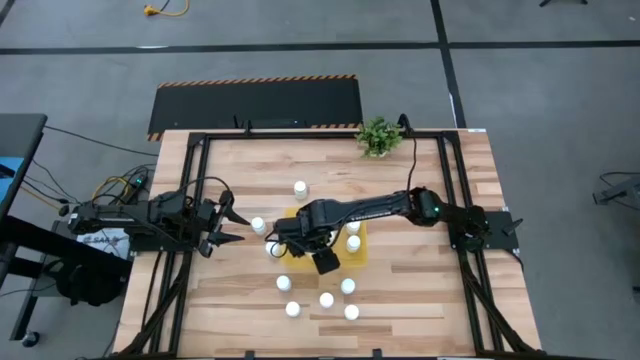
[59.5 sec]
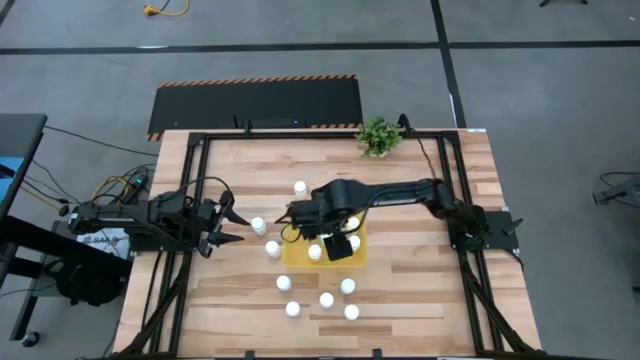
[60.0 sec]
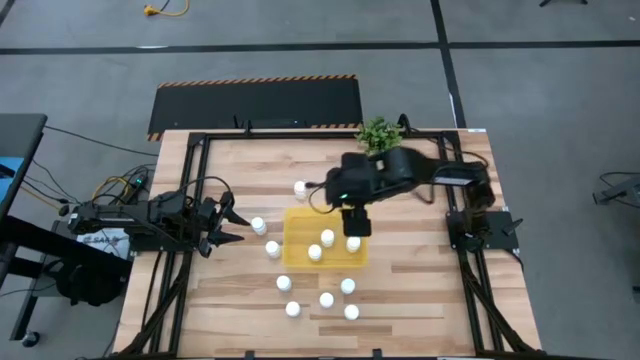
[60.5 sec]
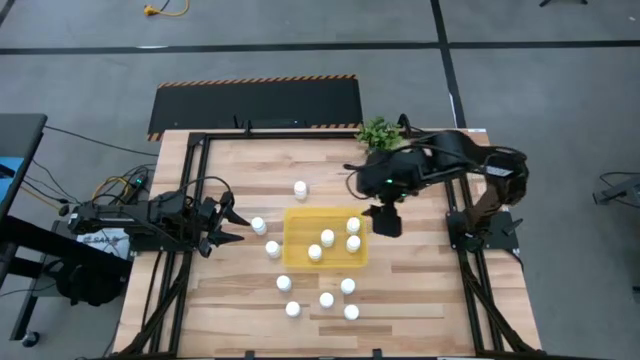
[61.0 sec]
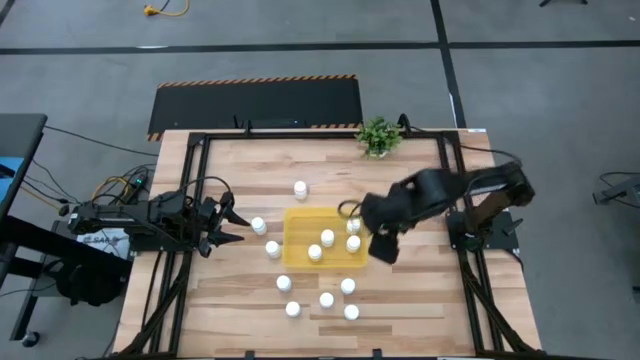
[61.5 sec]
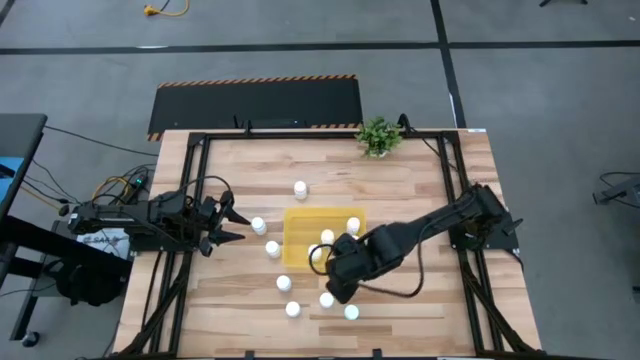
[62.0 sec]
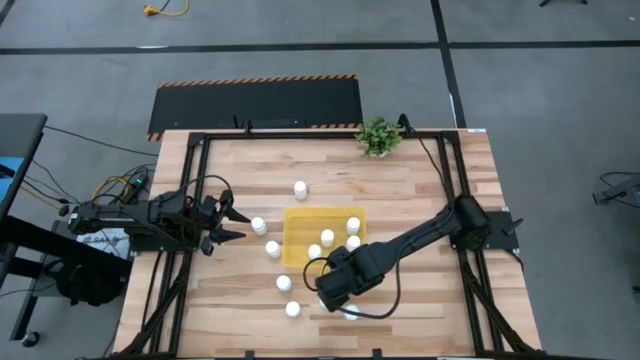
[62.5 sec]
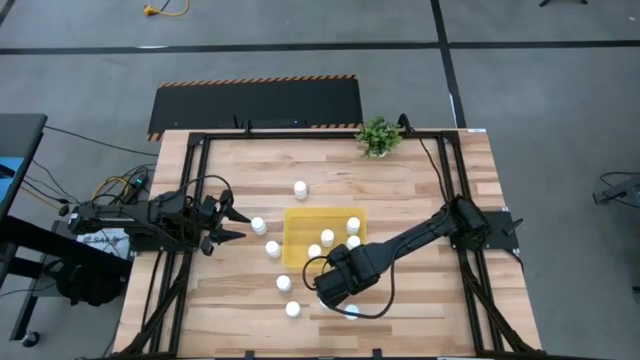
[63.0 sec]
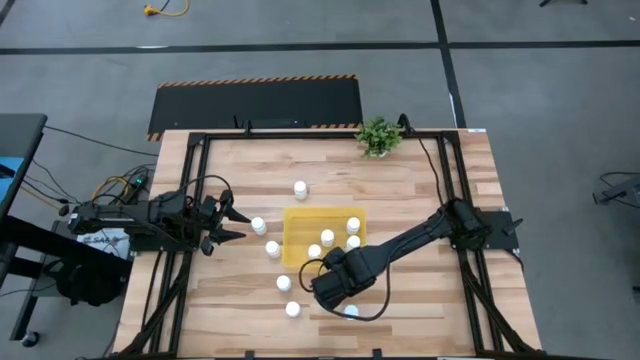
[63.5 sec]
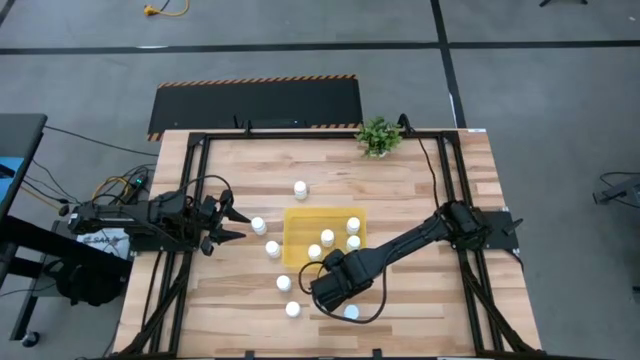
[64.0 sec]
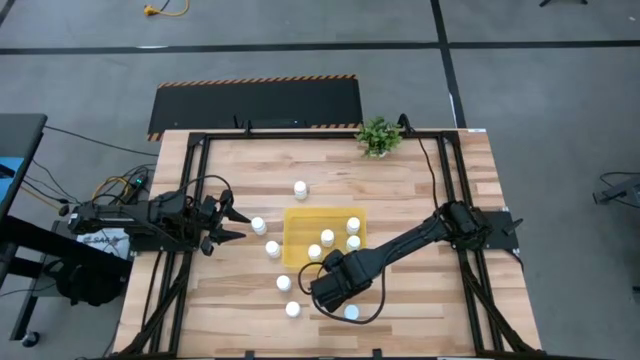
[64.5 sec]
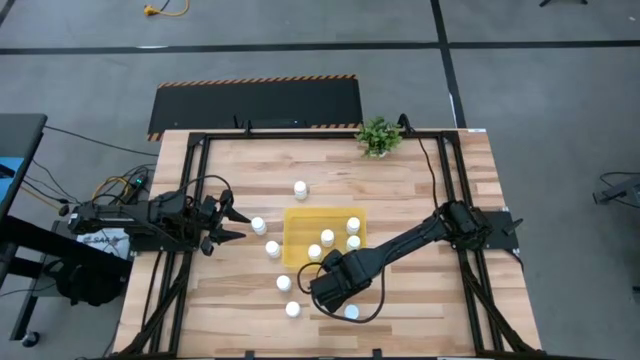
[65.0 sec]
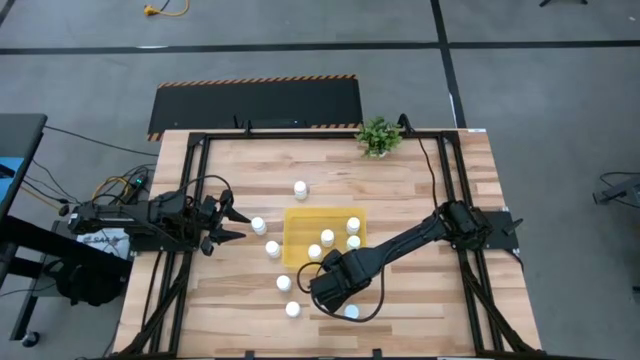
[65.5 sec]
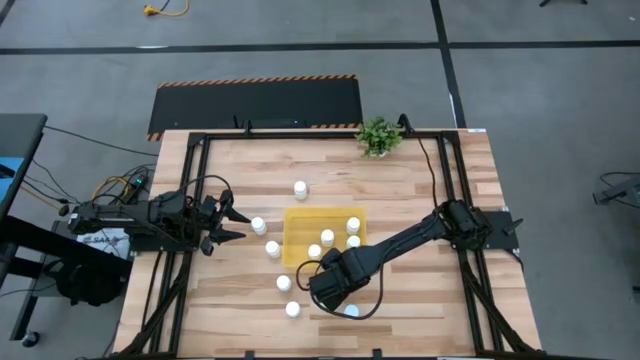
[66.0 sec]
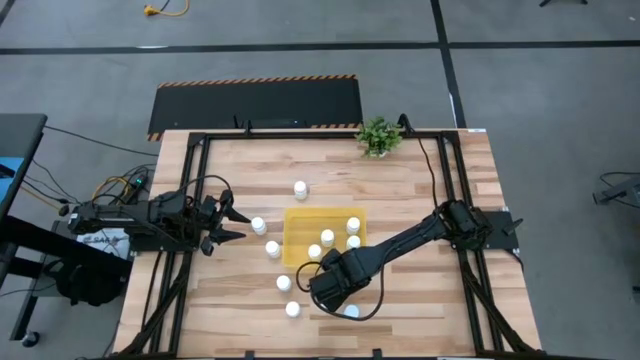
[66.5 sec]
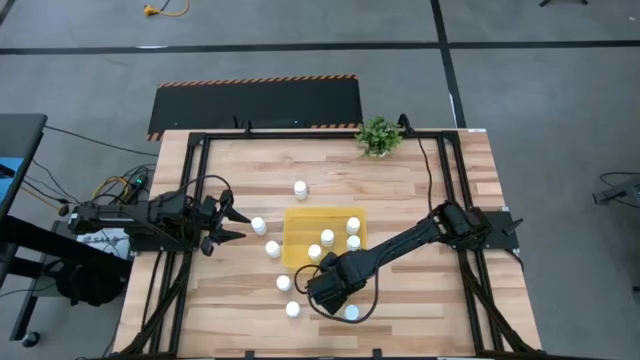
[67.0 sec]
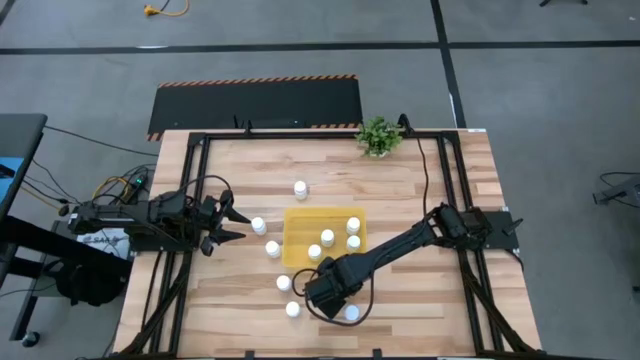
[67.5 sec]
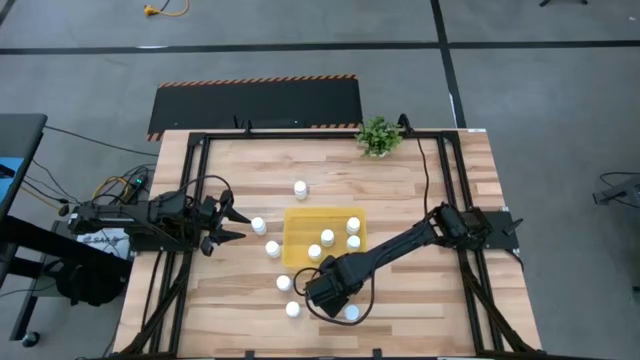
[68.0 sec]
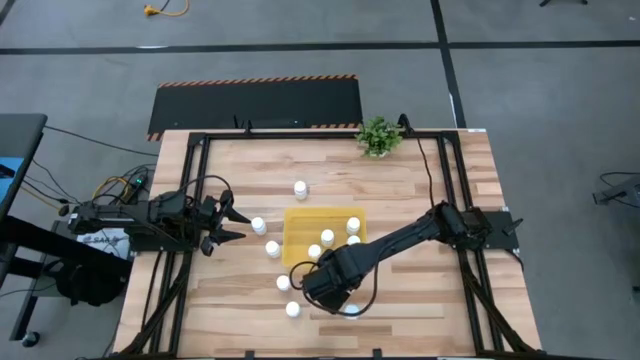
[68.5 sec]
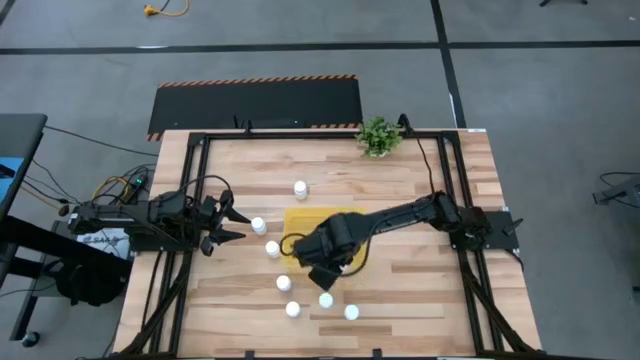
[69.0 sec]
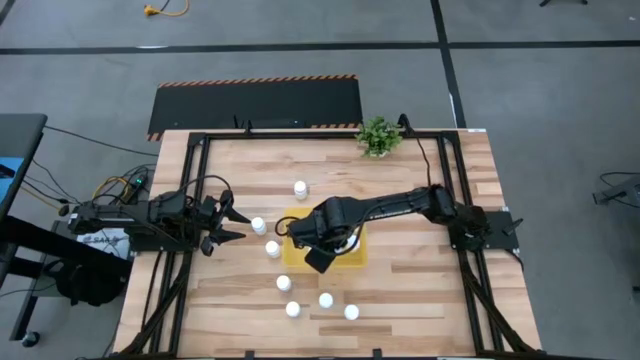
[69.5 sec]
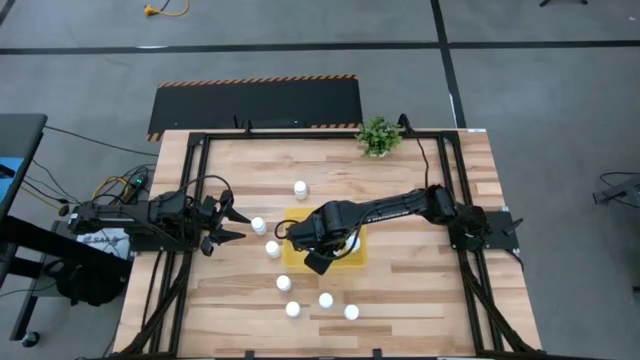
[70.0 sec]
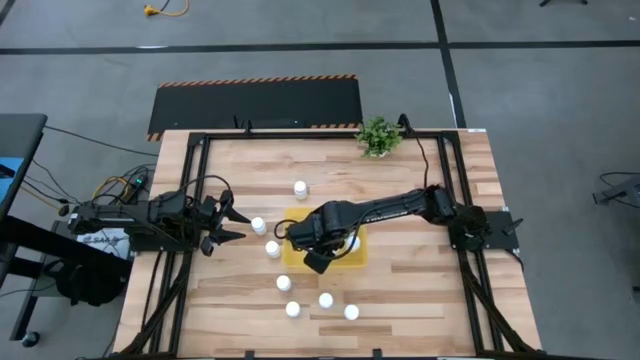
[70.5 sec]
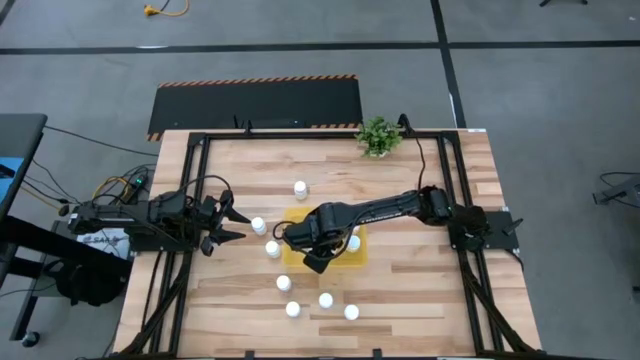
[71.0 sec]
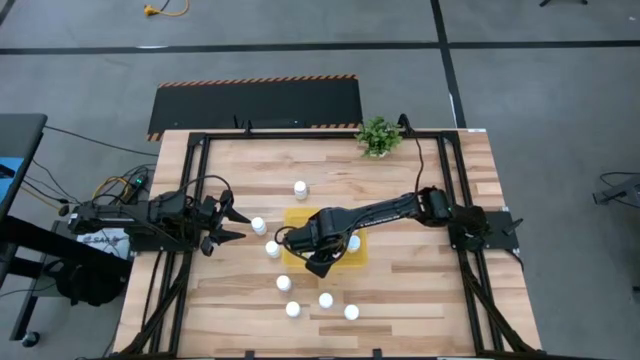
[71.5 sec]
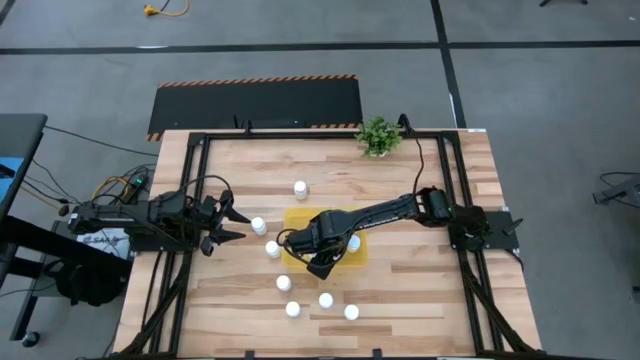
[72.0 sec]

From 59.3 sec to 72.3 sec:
Task: Pick and place pill bottles into a basket
Put the white pill bottle into the yellow bin

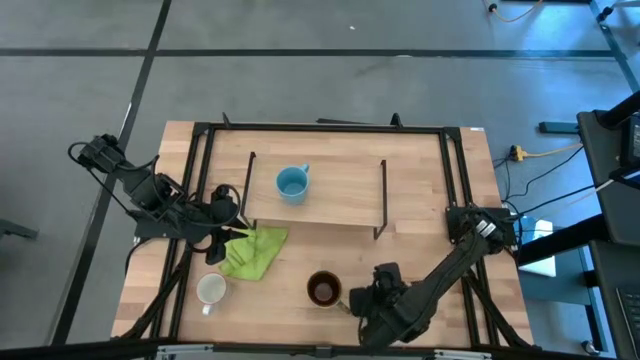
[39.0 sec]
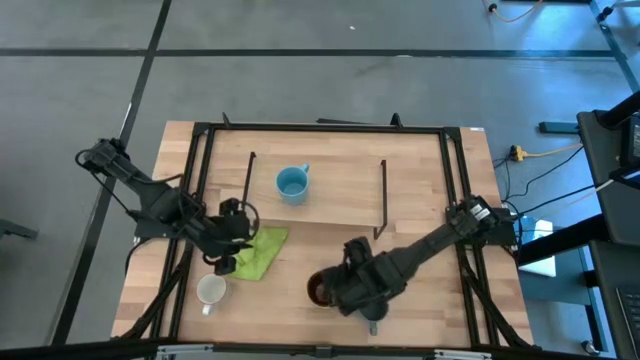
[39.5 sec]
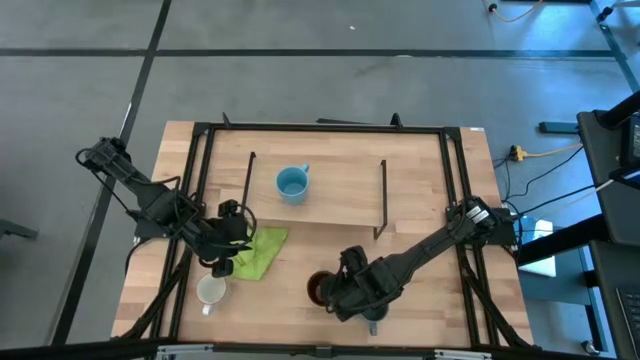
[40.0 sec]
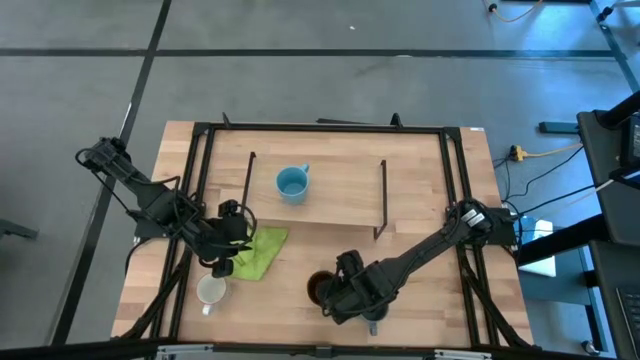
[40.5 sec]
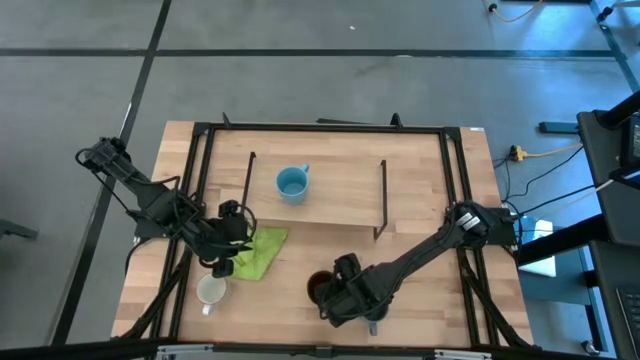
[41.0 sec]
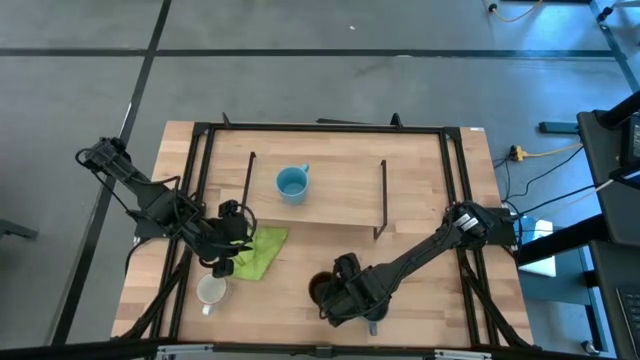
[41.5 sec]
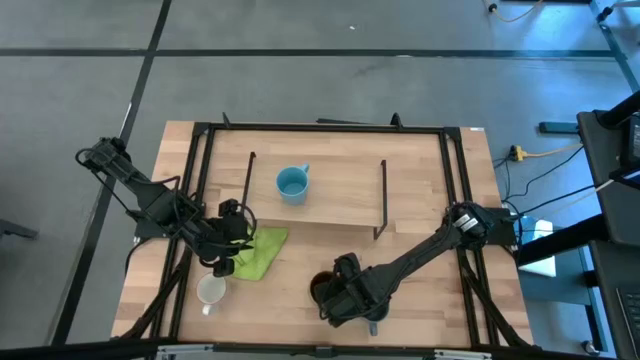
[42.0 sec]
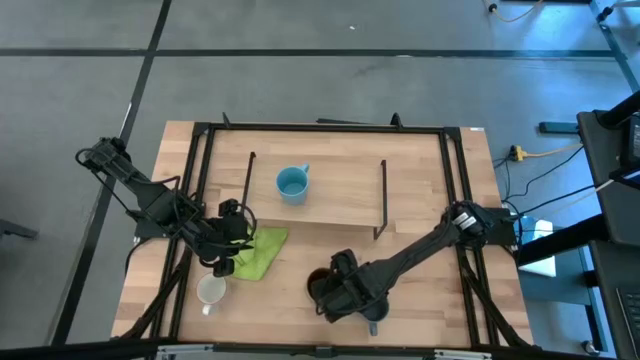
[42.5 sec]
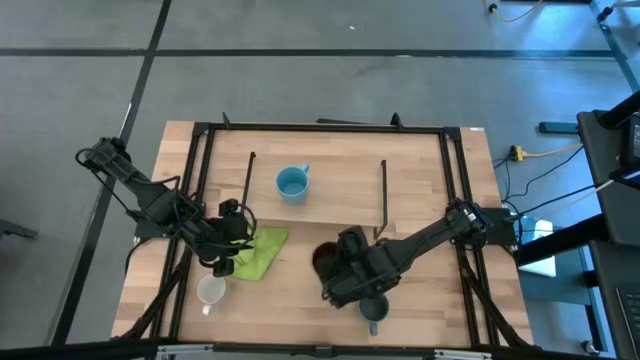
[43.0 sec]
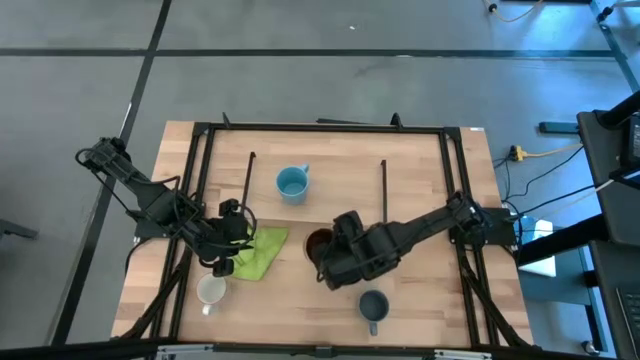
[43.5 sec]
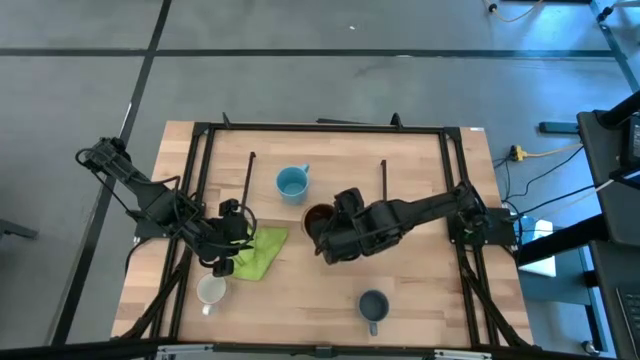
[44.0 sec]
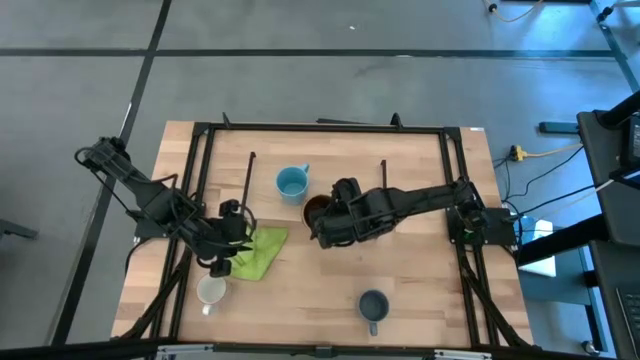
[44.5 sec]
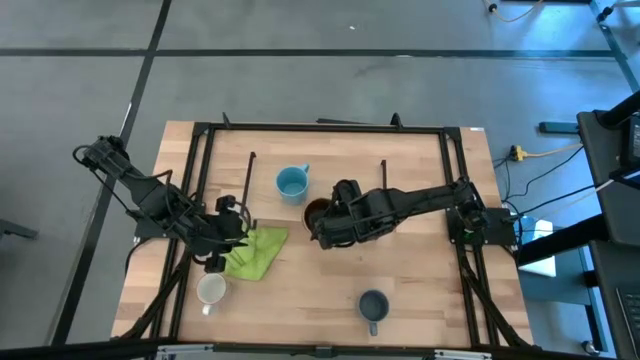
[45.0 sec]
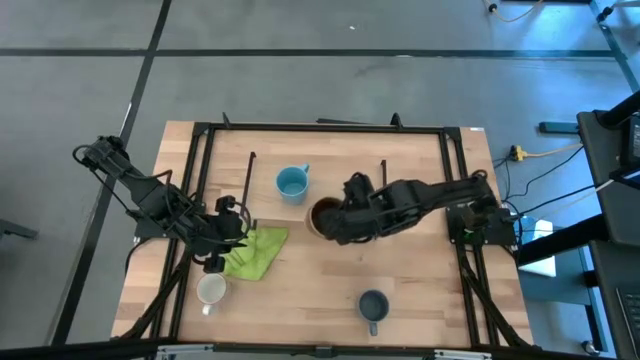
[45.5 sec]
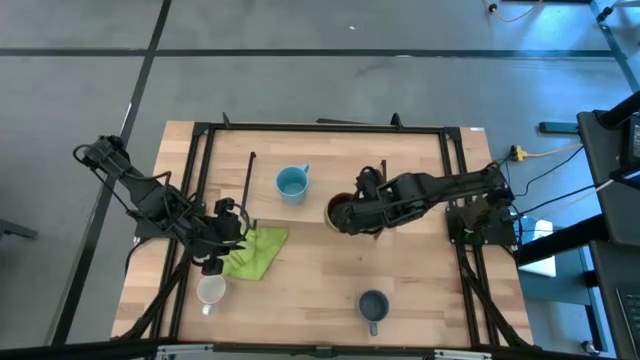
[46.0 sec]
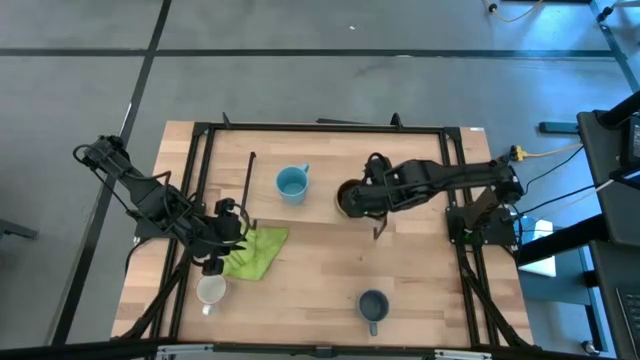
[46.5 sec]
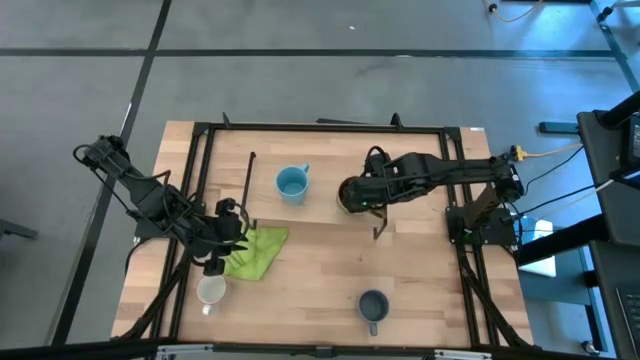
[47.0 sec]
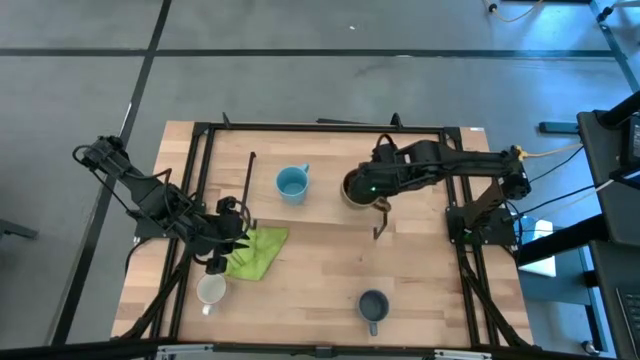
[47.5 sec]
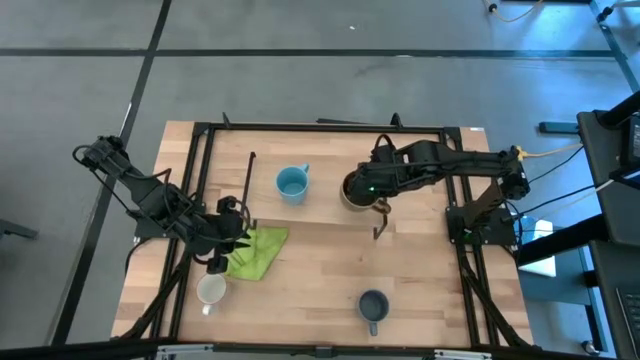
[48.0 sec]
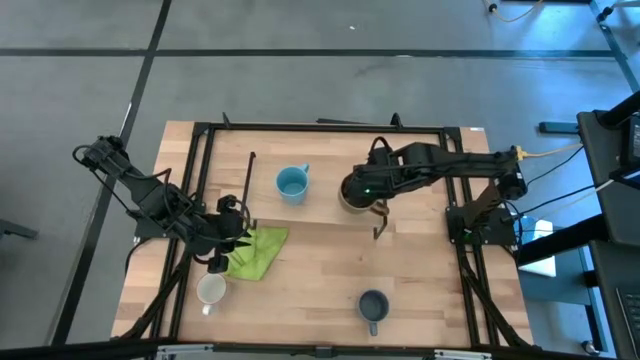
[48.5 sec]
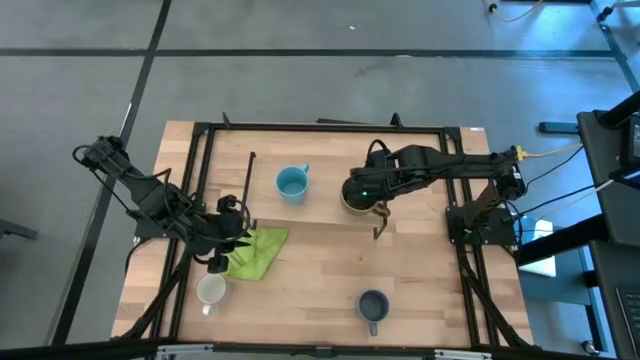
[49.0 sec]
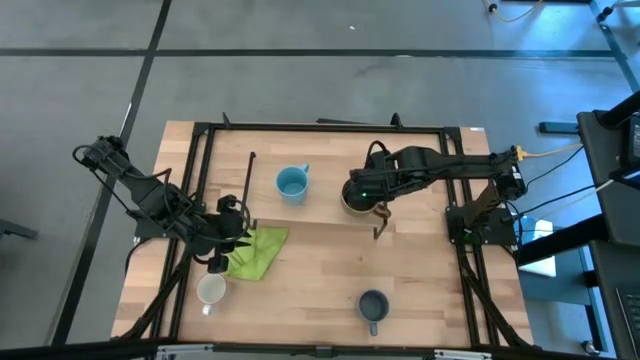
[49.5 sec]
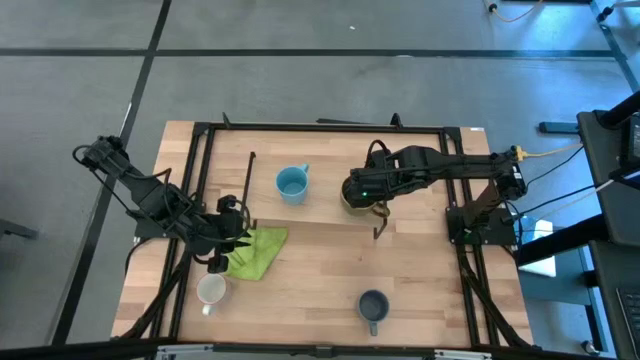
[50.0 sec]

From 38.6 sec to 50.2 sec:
Task: Stack small to large cups/mugs on shelf
Put the green mug on the shelf
